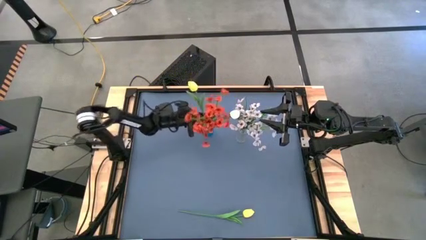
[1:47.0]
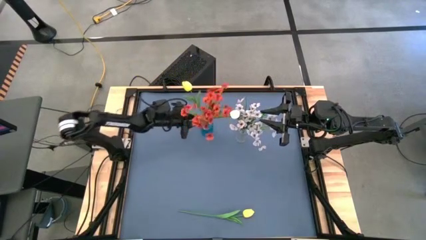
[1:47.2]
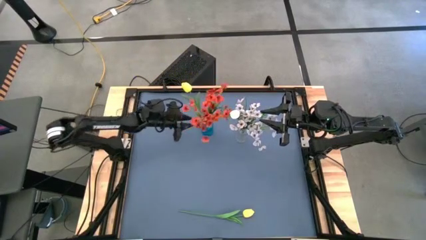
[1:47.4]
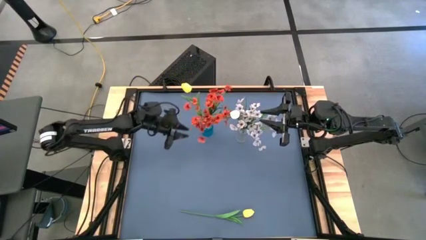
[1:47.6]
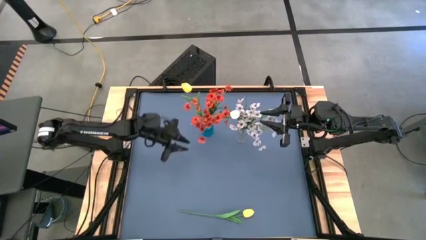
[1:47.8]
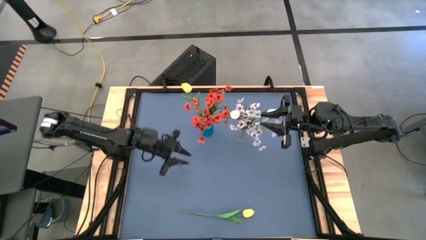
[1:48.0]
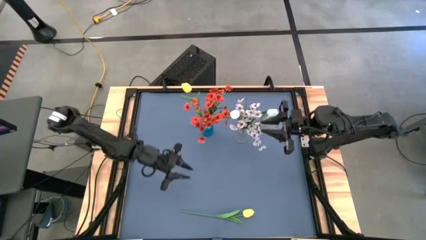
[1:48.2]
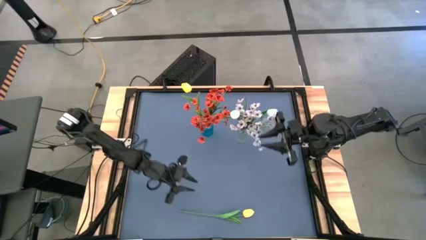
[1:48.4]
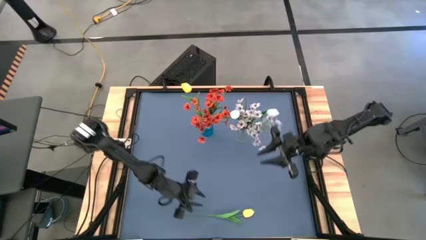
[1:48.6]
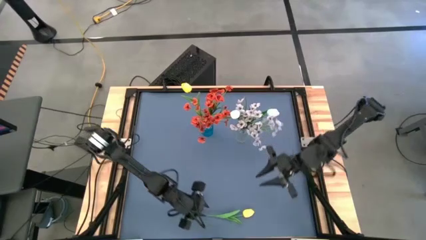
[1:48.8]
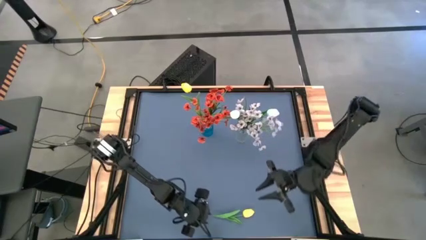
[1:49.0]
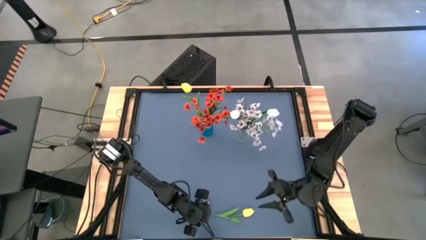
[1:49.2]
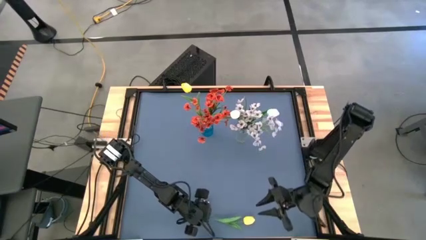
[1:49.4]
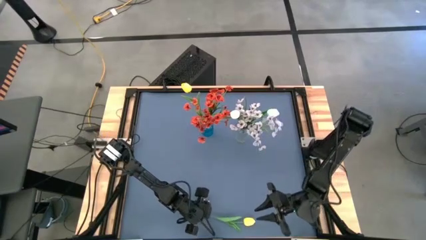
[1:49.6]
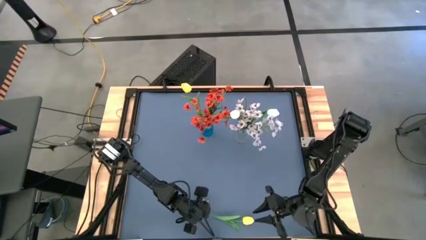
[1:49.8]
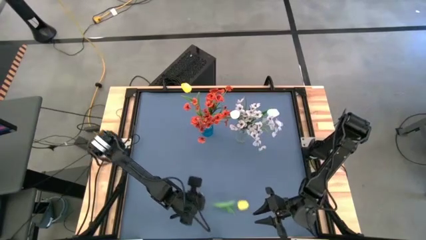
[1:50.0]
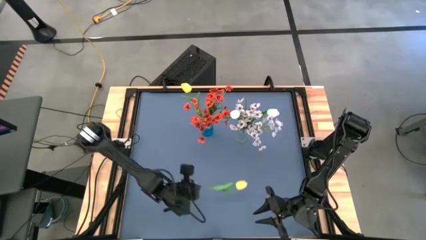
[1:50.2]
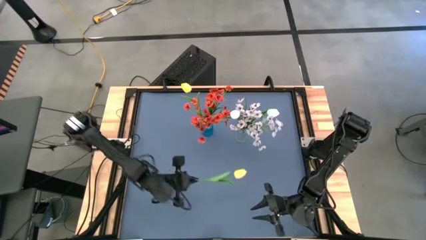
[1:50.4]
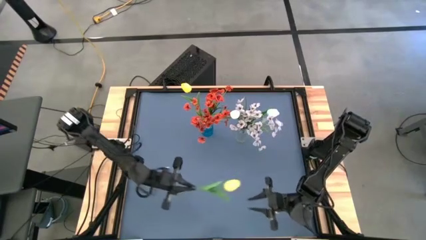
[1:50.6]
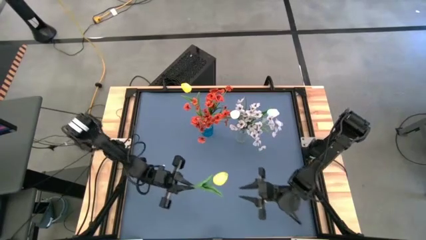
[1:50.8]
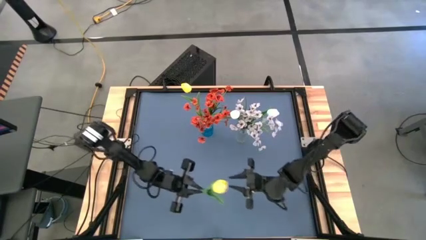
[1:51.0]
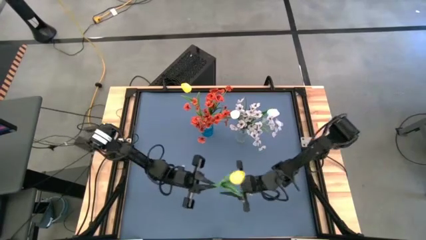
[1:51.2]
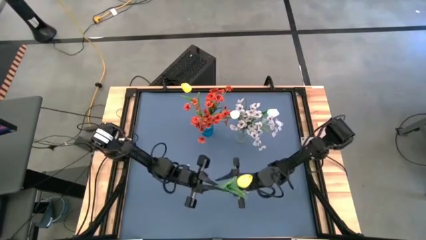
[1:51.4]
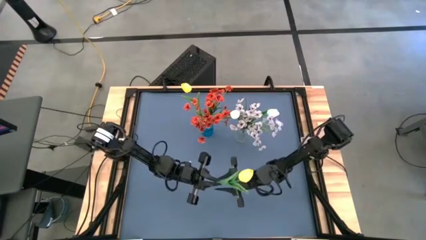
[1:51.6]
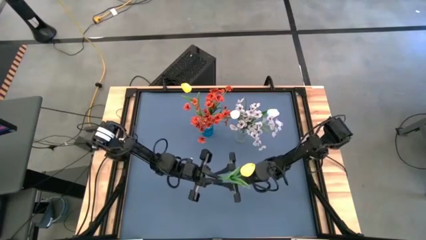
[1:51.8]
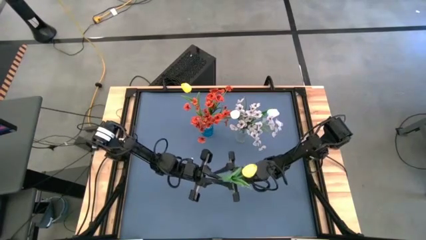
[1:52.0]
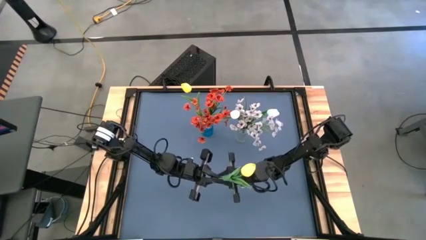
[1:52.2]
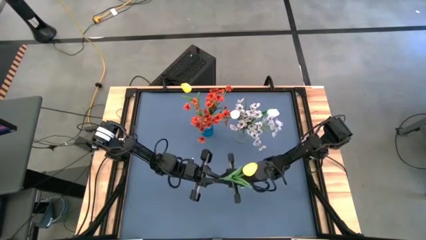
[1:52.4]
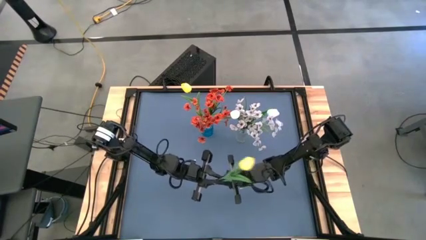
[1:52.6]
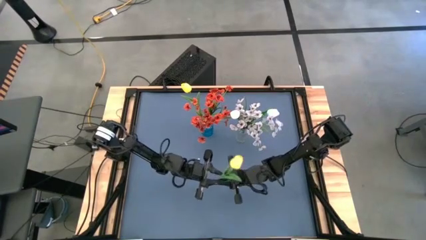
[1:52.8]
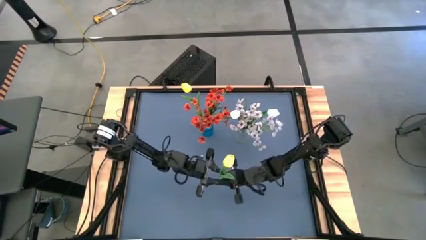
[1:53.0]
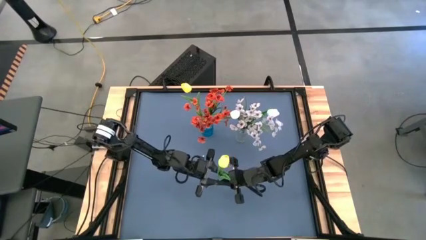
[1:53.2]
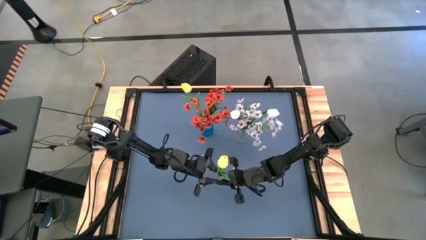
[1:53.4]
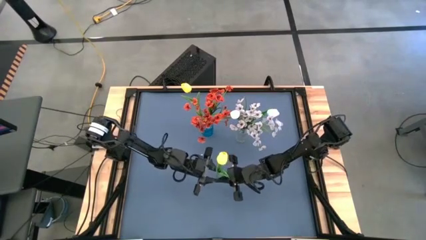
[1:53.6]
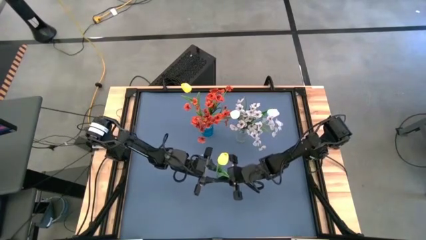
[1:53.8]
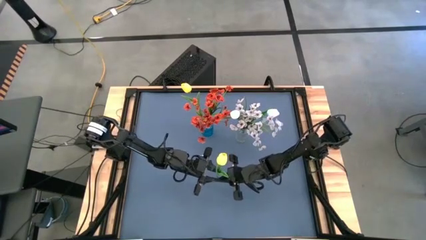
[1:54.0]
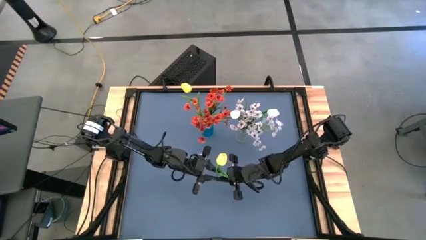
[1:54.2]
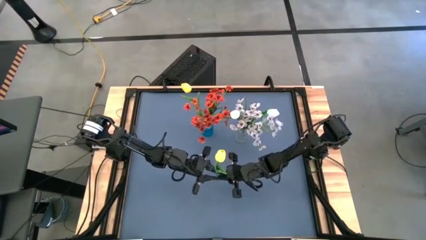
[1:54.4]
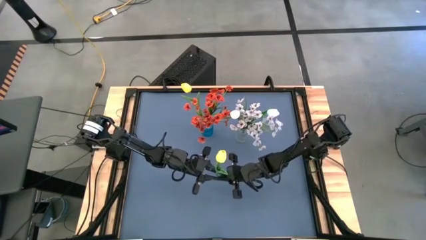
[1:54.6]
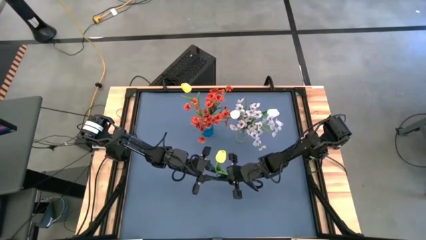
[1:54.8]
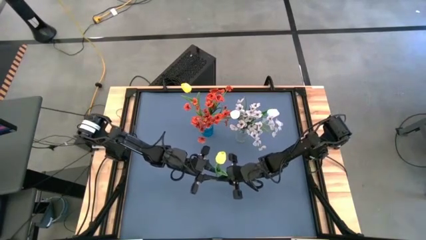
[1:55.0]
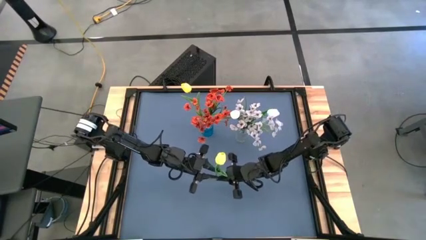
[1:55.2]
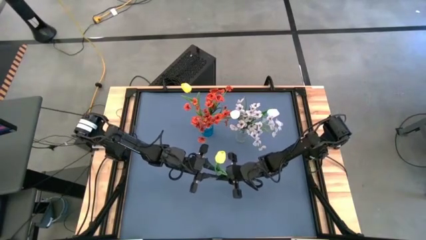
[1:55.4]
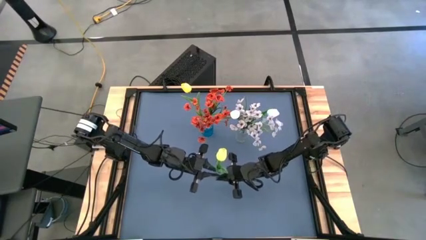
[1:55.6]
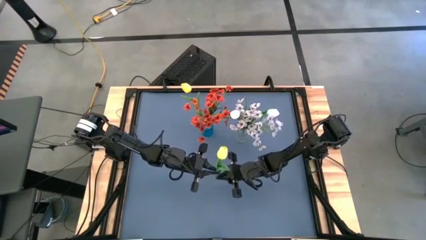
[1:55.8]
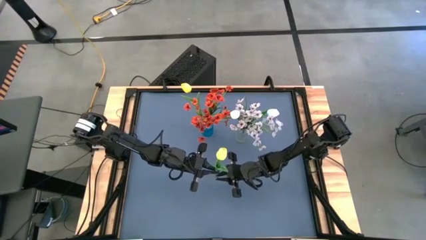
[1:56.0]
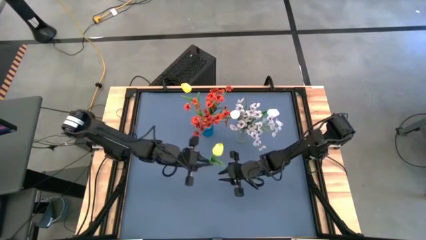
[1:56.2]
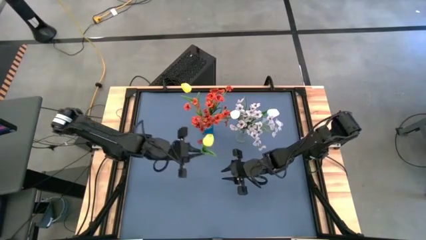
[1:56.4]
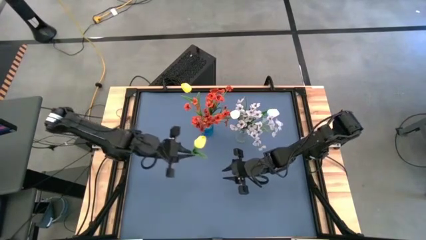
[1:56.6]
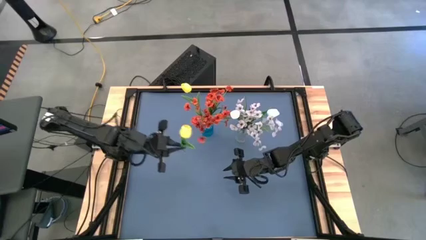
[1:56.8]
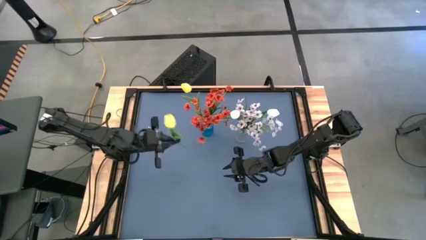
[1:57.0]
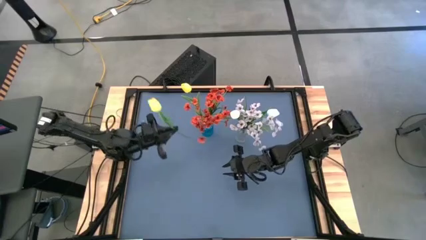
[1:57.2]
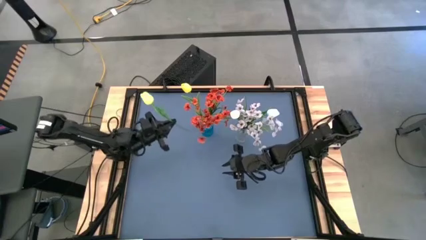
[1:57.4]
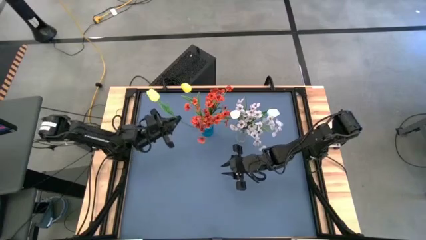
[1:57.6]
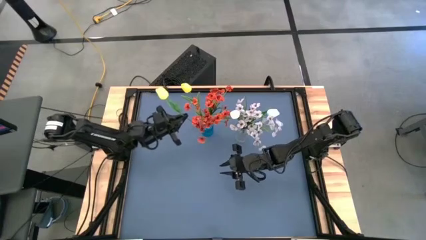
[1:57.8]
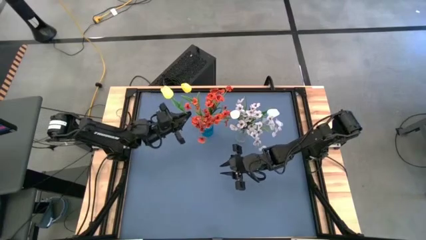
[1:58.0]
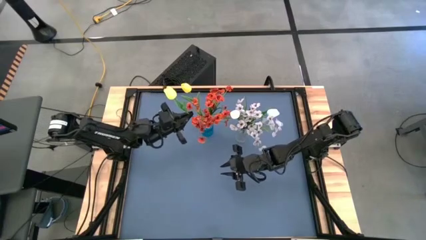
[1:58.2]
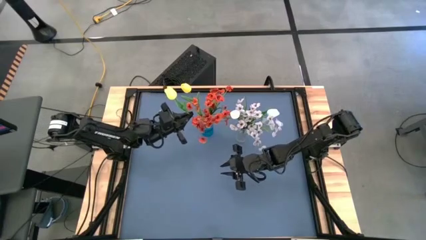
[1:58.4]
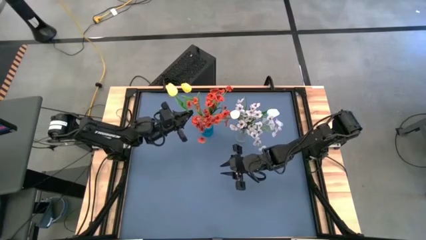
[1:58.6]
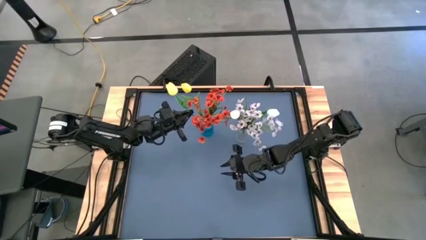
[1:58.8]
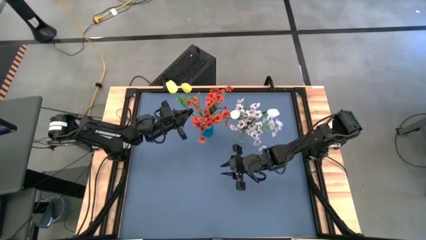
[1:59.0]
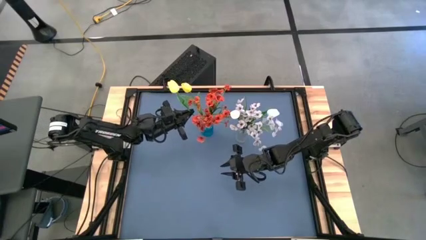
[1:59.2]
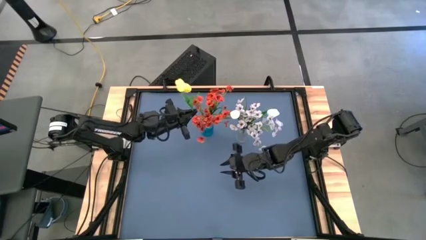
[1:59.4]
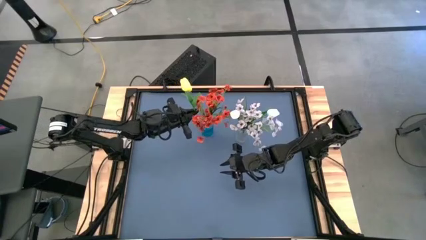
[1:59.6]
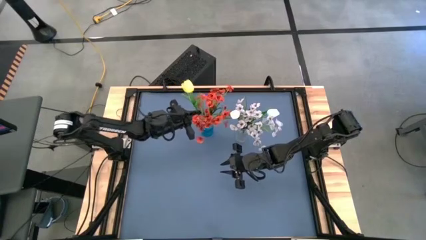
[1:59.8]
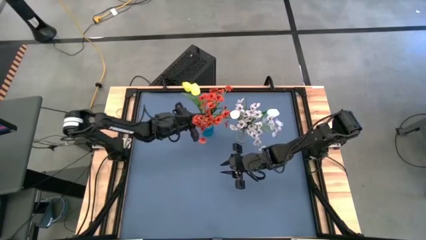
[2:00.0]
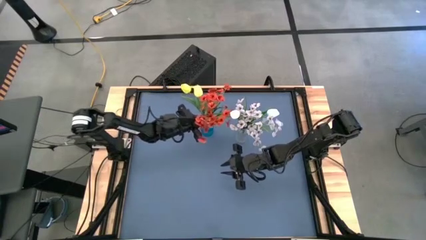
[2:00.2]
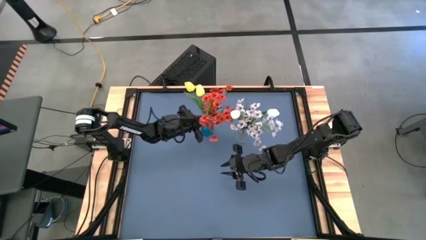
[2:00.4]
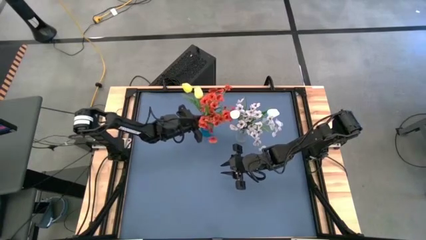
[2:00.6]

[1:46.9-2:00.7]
Task: Sort flowers into vase by color
Put the yellow tulip into the blue vase

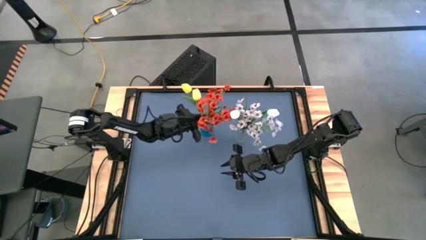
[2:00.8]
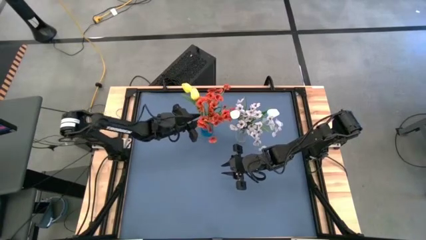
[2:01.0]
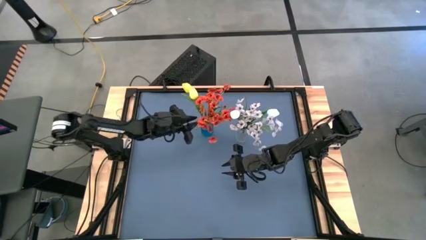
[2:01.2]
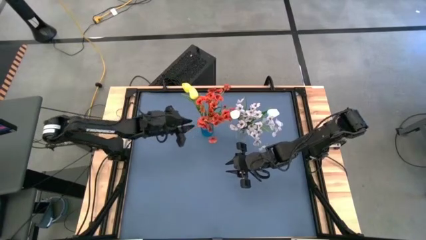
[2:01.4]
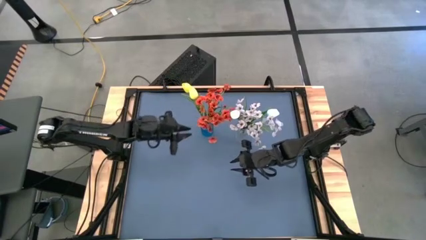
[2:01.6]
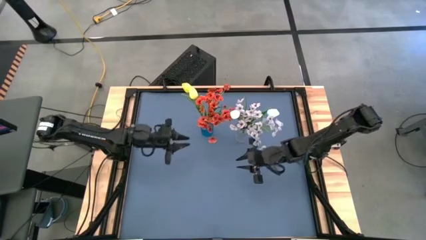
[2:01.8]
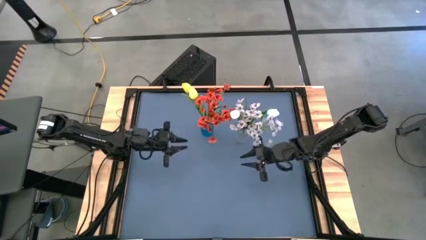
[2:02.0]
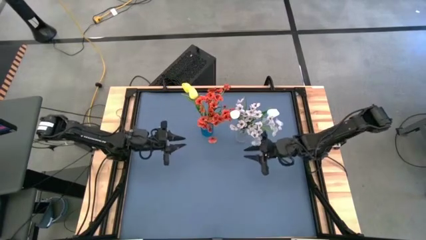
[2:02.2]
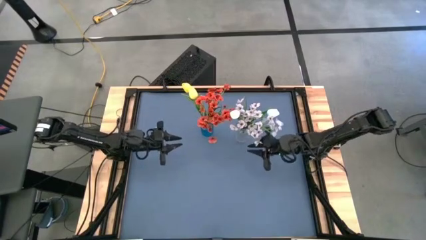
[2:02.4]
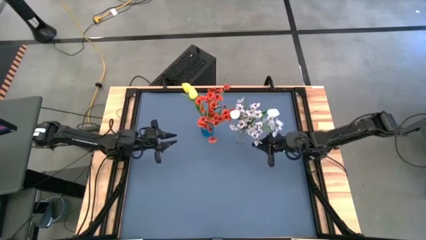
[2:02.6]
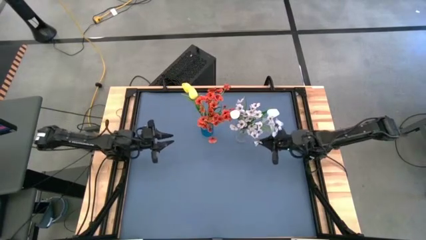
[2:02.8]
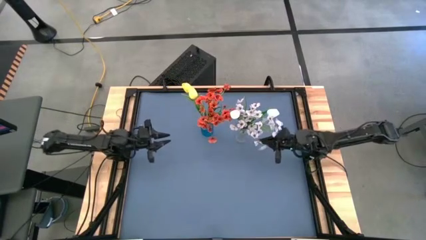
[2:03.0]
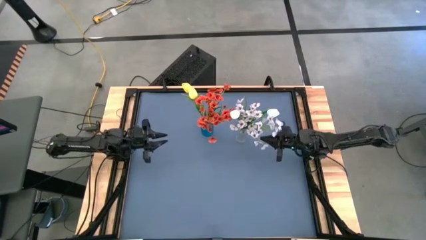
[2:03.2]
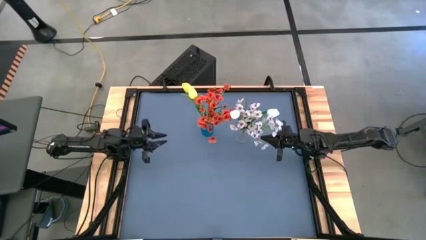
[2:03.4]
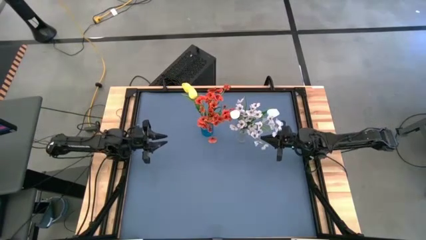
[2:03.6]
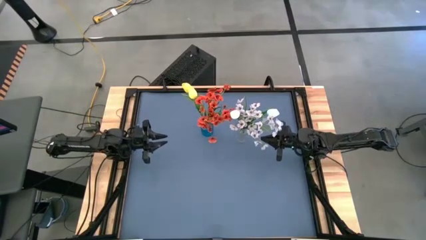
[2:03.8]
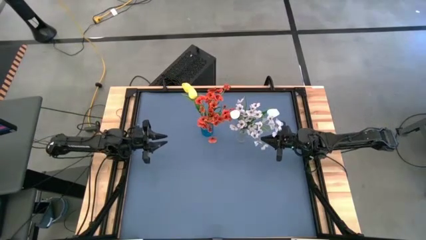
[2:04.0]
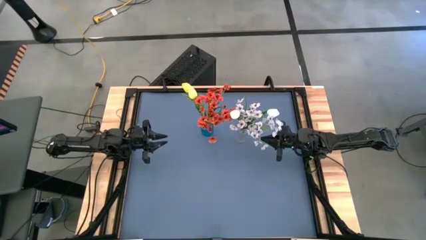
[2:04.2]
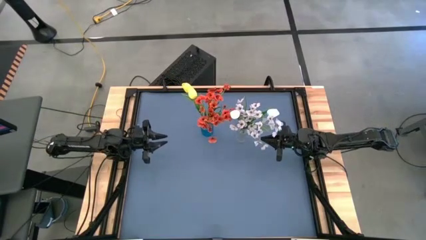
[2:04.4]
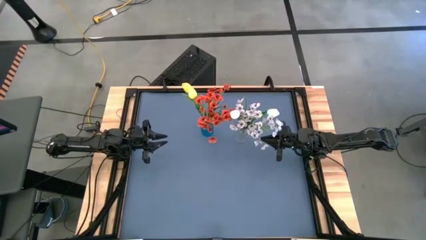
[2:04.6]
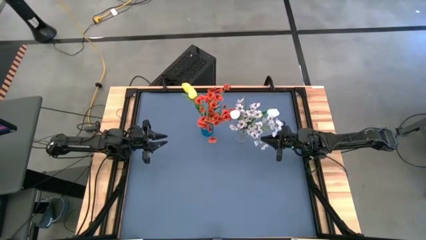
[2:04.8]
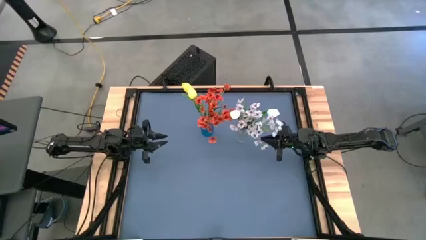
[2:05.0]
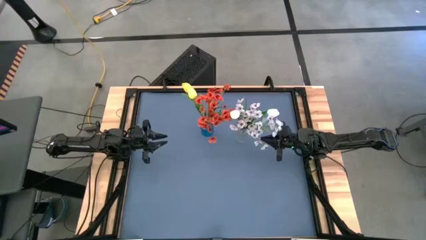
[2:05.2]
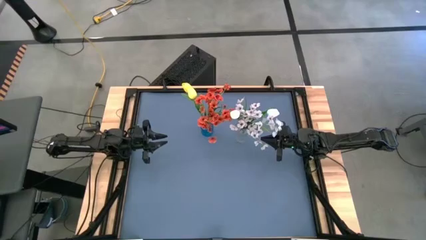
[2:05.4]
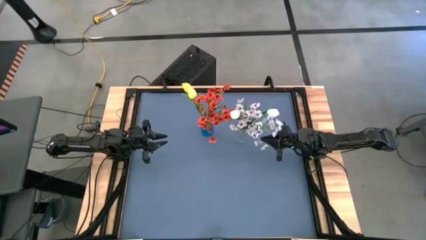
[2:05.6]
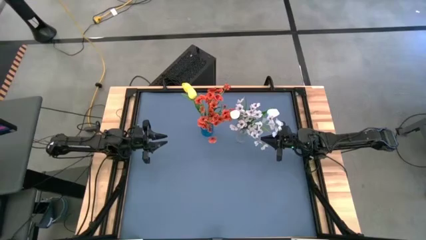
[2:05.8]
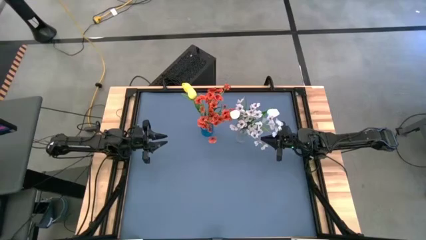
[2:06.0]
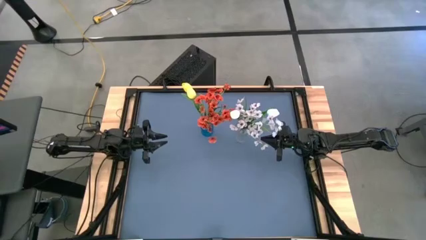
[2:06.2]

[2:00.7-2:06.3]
Return to Home Position
